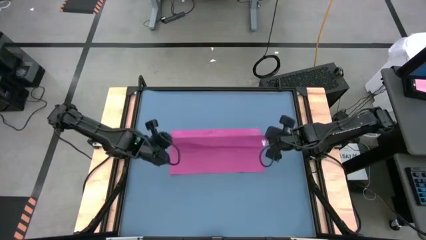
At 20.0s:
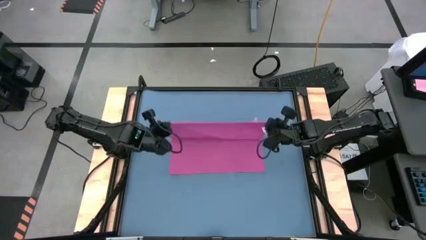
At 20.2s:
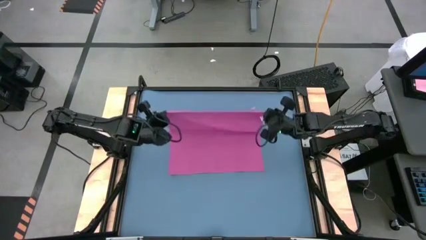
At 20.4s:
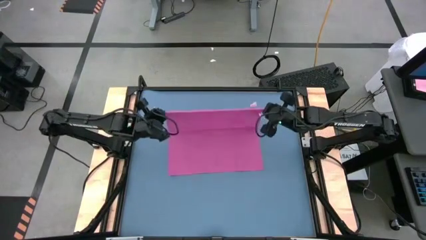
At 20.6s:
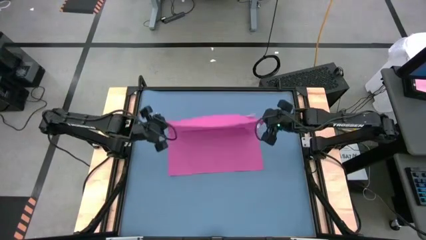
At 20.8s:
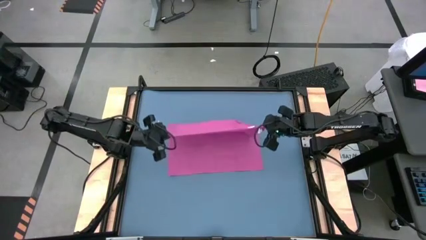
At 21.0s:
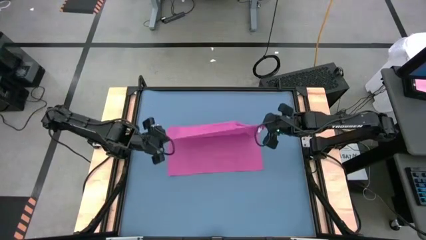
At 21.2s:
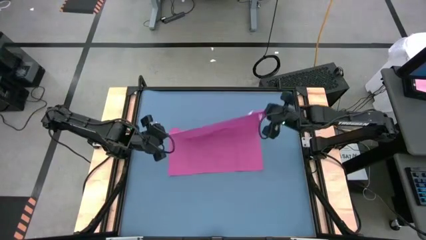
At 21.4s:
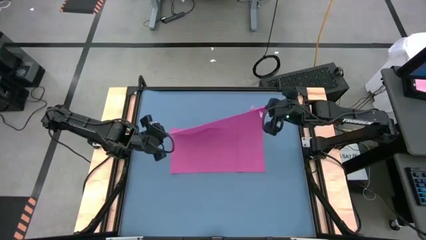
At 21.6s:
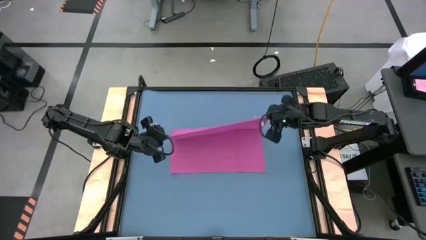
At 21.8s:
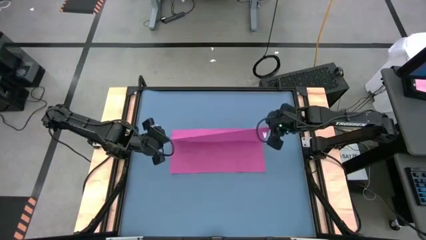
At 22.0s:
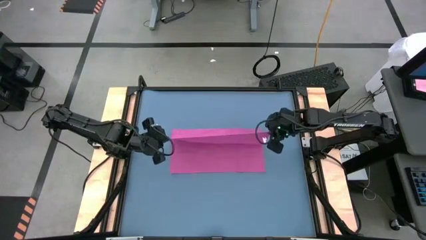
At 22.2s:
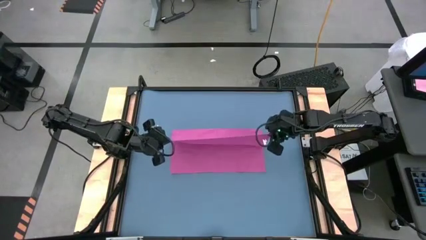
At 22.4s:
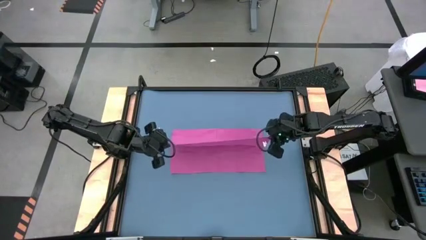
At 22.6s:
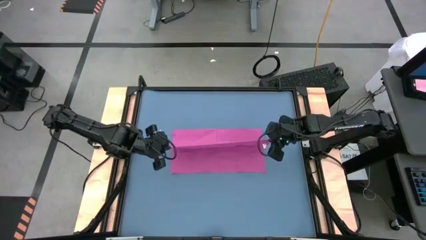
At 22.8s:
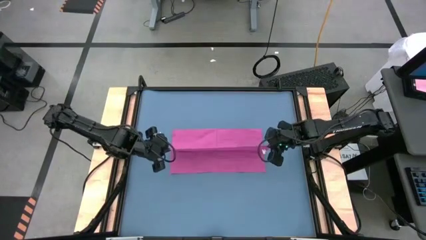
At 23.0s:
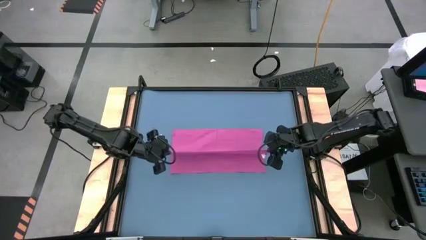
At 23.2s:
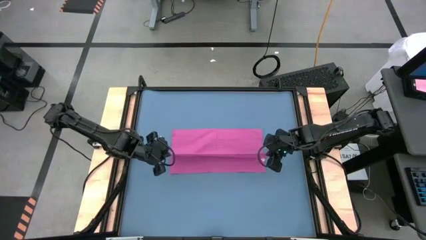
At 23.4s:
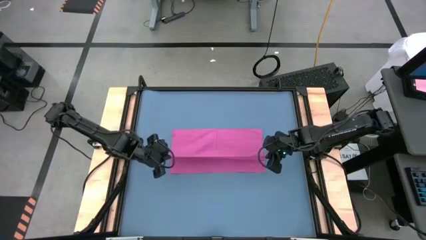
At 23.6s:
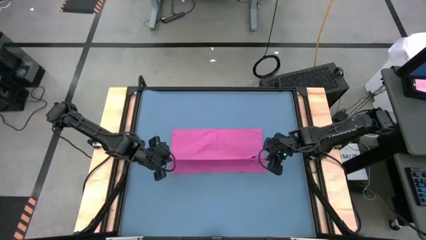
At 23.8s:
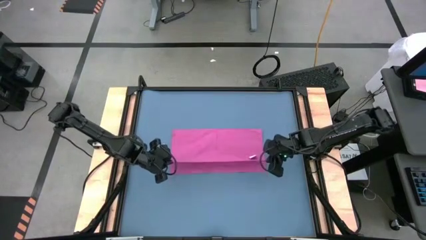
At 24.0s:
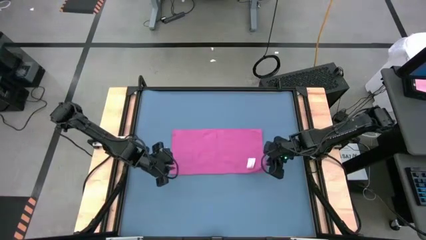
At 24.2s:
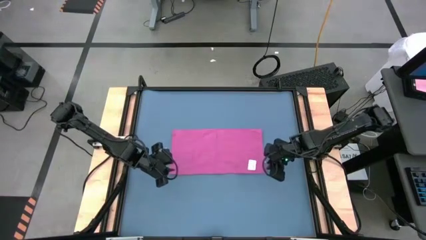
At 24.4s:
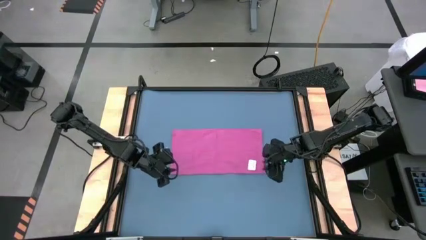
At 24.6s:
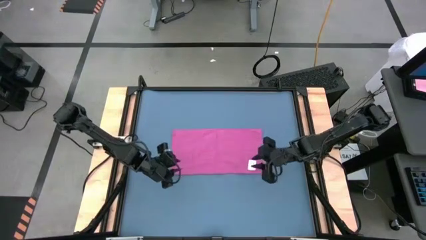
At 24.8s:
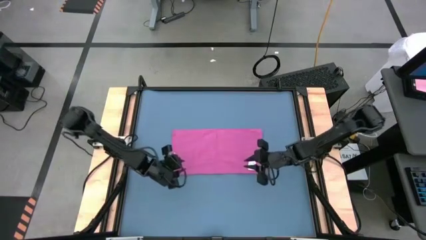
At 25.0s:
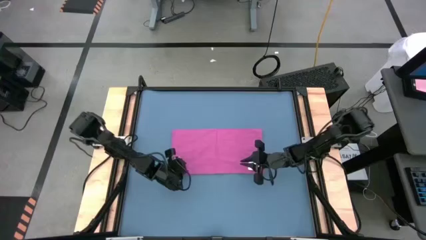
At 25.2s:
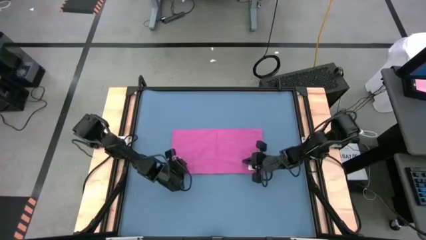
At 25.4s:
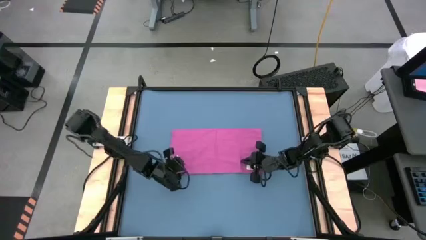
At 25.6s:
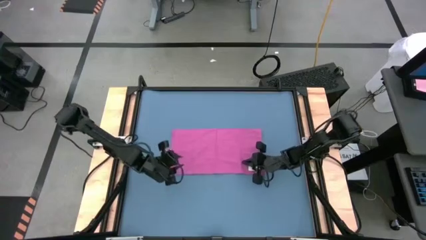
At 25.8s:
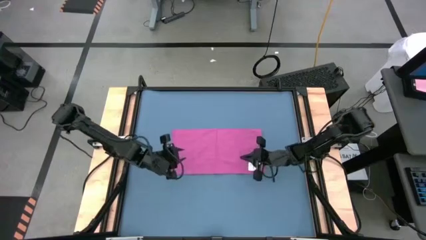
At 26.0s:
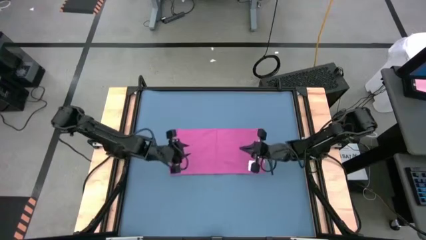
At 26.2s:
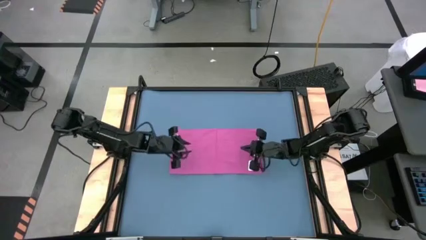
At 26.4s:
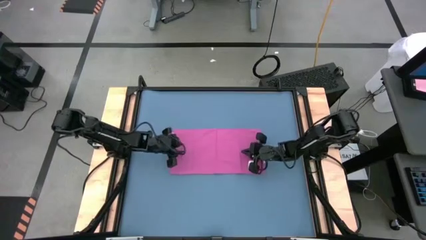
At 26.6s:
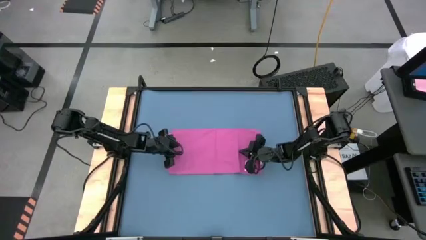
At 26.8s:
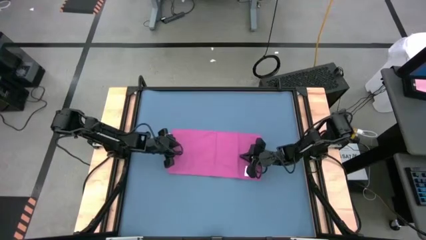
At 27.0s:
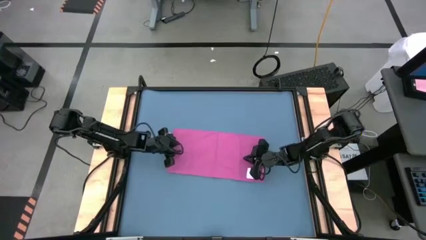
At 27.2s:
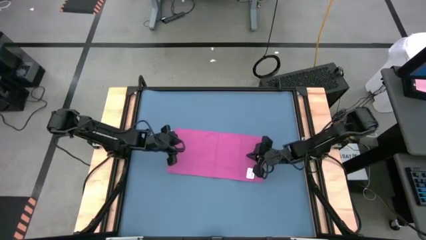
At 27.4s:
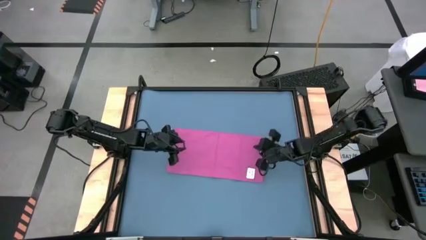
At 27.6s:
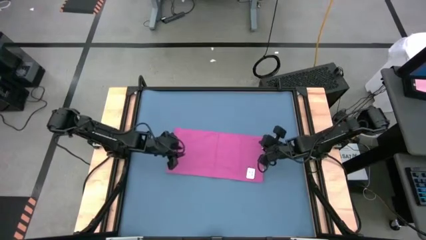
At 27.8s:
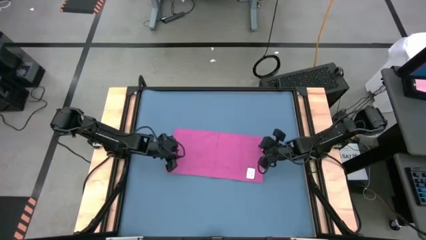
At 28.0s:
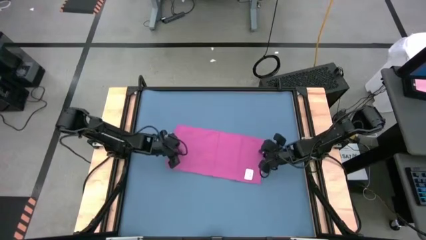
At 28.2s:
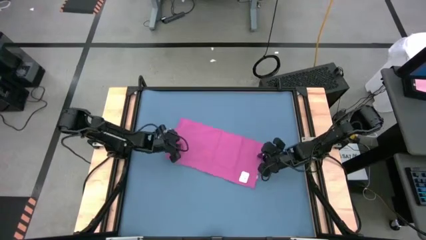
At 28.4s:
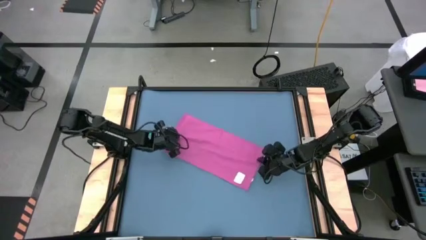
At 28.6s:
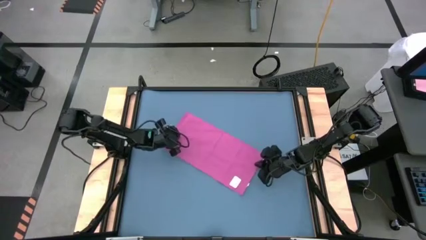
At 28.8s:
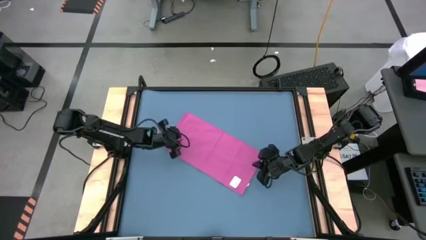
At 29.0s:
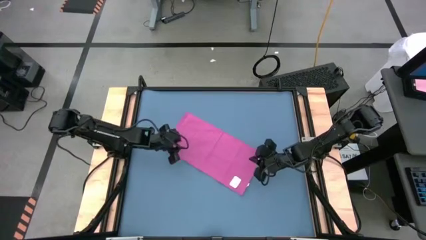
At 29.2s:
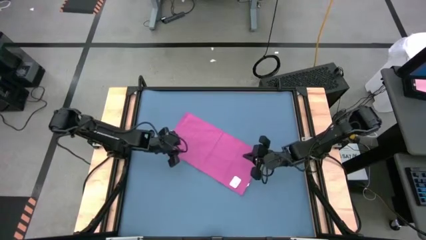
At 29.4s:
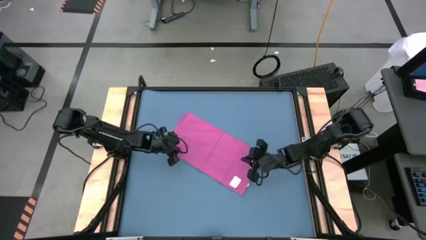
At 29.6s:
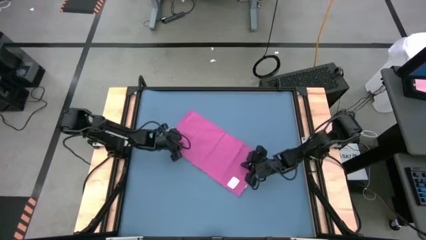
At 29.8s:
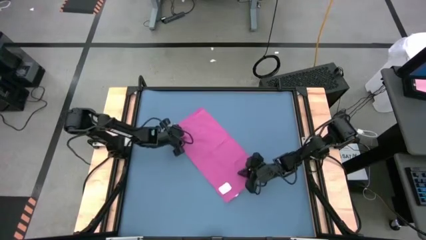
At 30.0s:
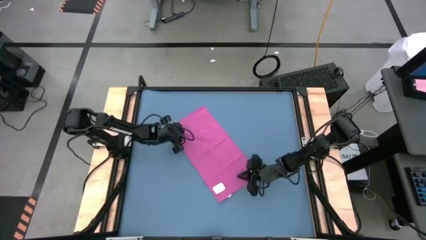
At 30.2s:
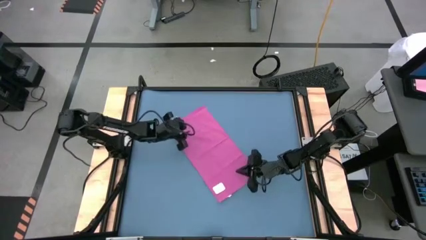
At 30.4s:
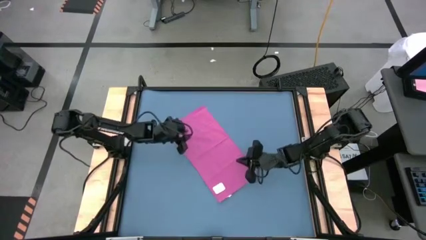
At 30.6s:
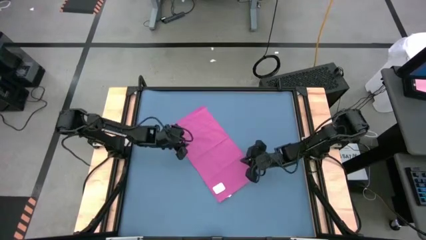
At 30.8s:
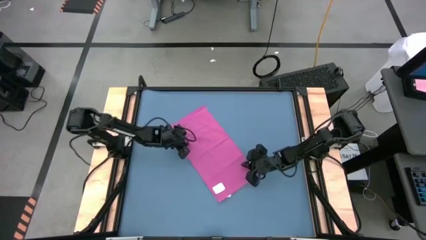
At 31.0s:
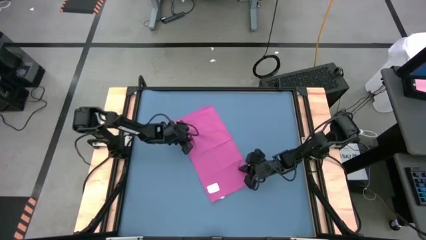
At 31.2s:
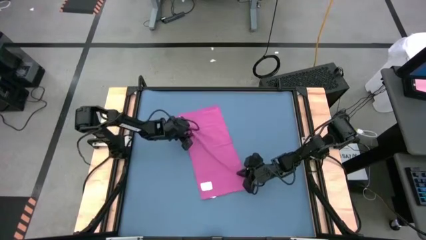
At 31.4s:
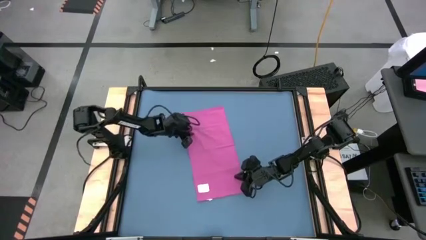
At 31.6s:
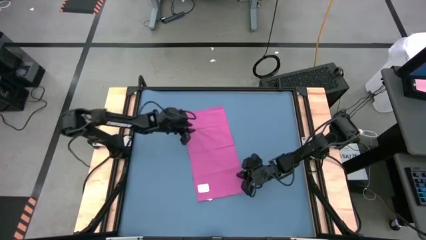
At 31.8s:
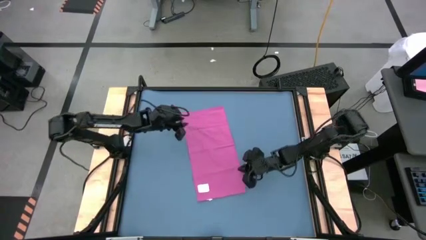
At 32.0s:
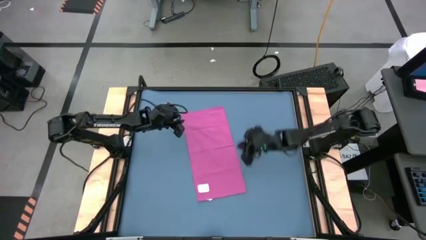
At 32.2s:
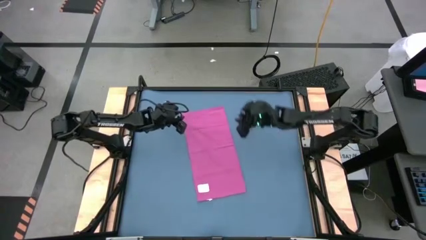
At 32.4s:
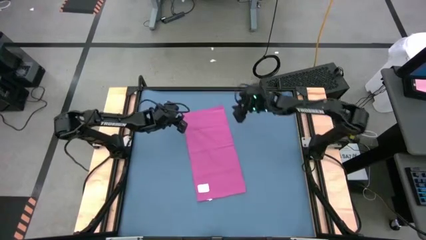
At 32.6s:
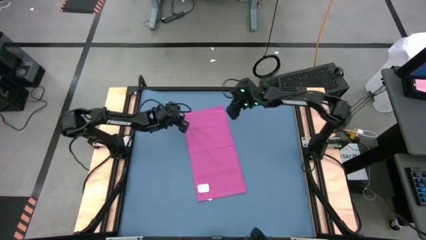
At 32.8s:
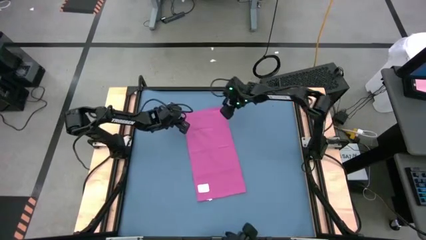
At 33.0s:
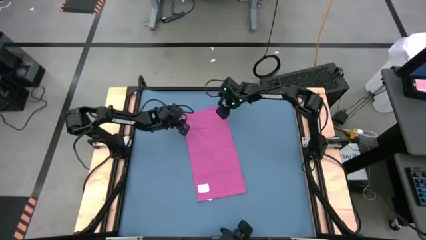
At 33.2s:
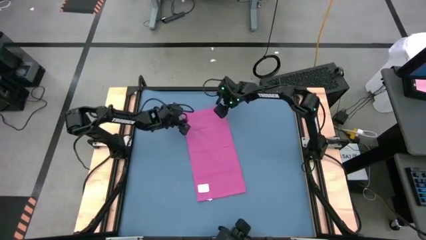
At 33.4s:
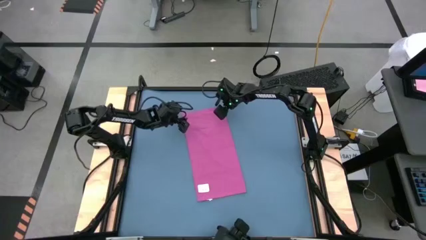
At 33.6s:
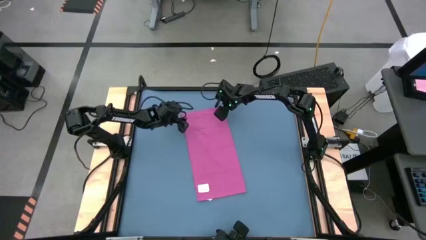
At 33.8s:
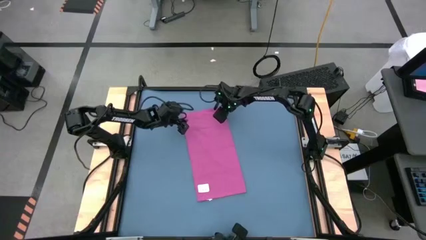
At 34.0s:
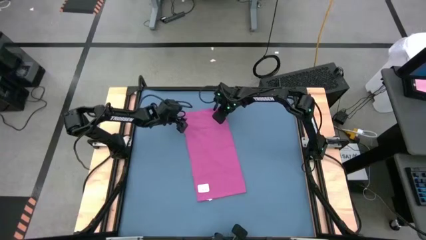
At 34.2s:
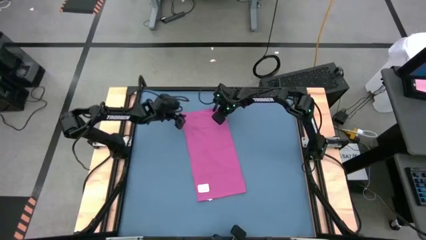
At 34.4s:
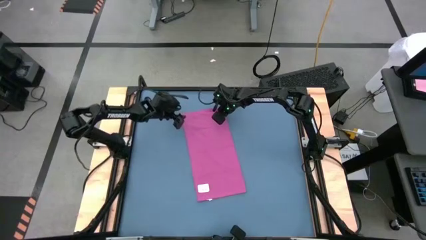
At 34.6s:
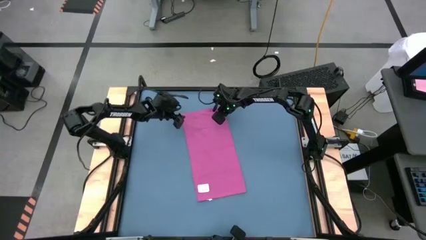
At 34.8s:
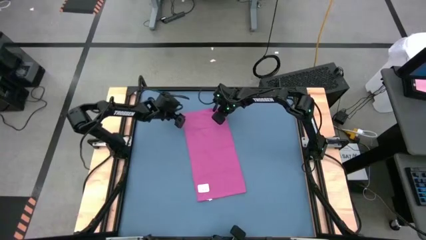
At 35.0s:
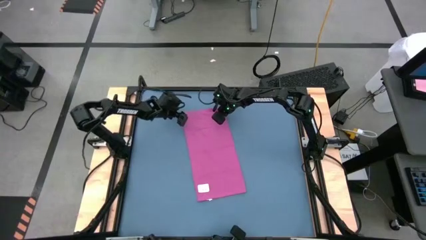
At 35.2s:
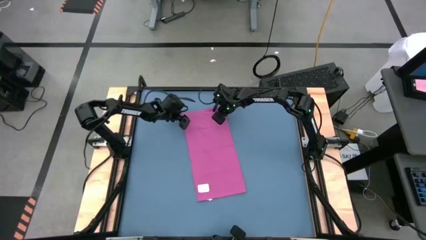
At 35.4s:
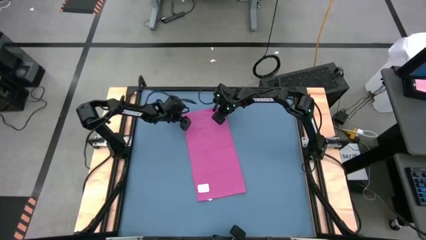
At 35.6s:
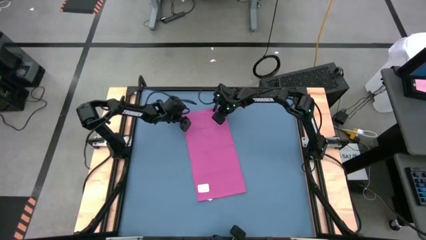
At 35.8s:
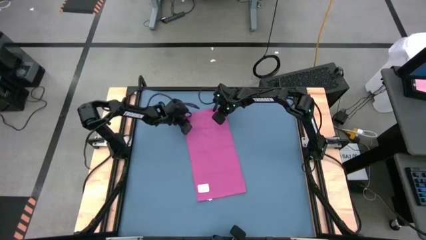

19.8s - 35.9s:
Task: Roll towel
Fold the light red towel
